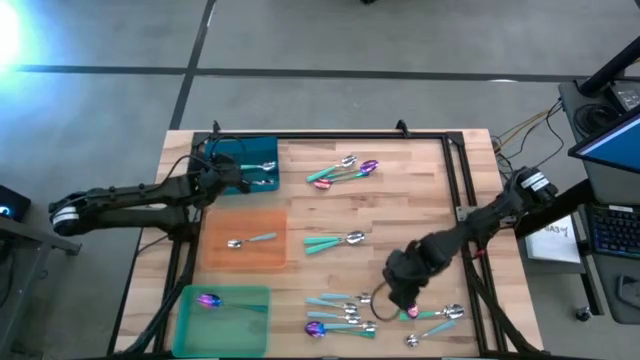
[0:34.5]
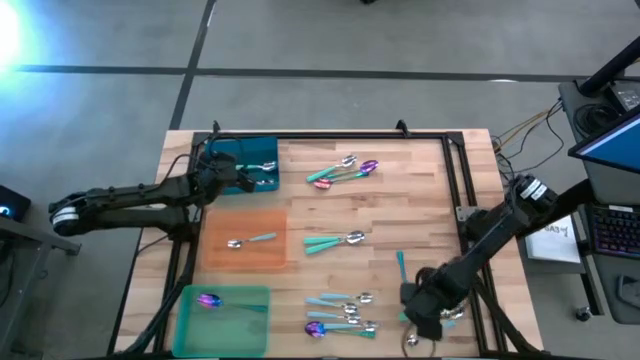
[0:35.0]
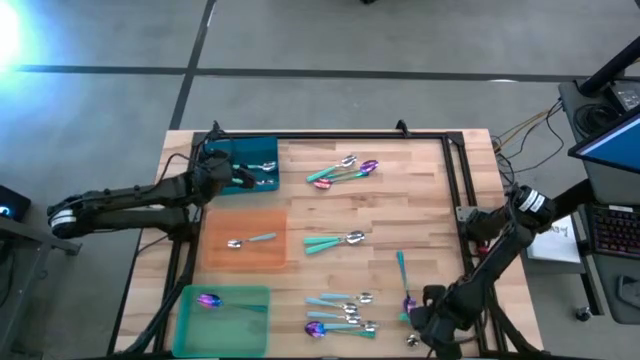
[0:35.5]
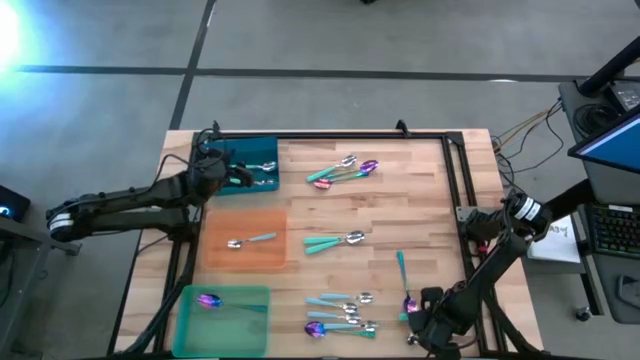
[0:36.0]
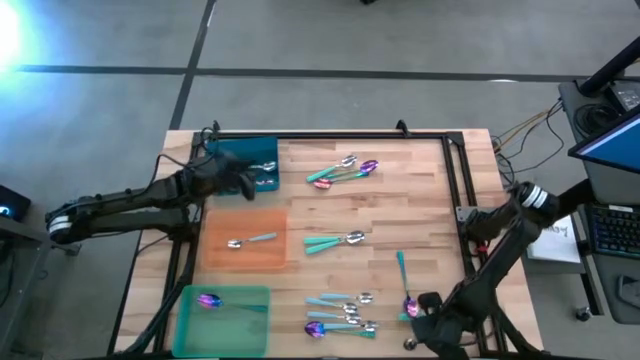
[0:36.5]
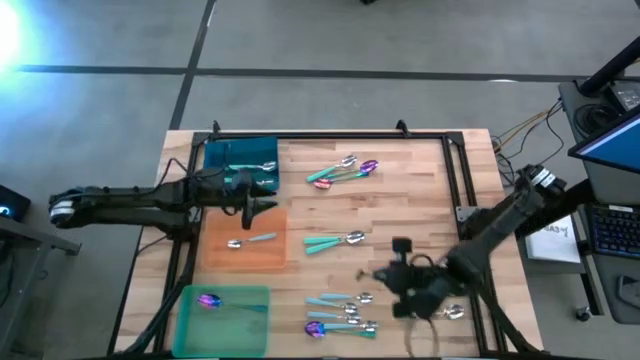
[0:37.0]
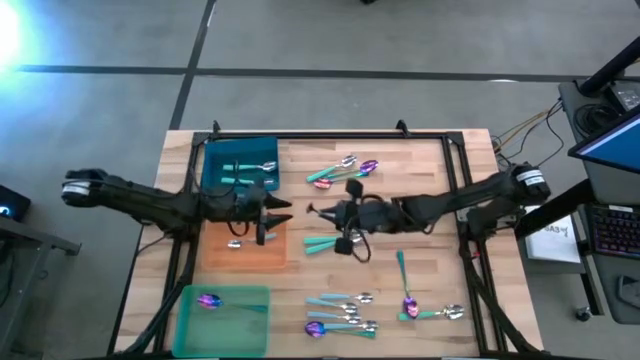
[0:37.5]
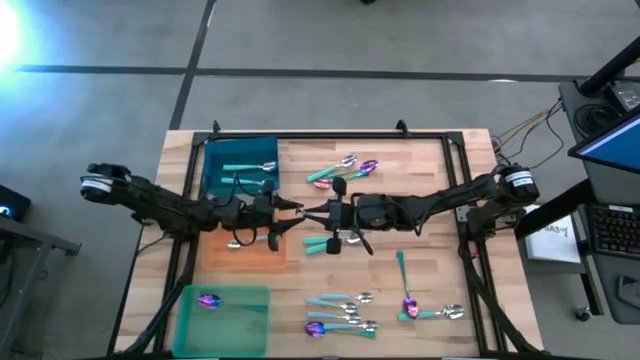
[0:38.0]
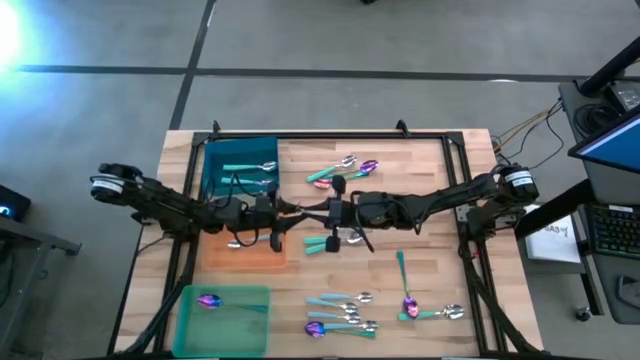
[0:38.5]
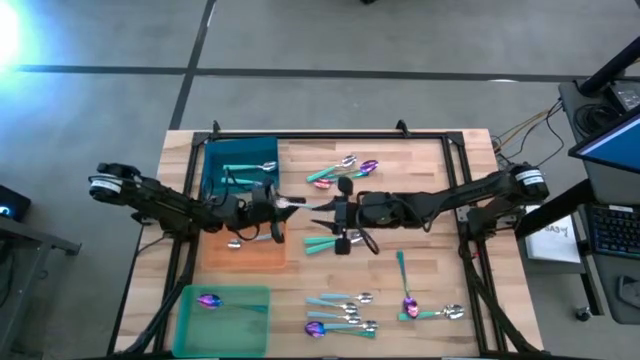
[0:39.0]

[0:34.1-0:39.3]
Task: Sort silverware by color (type)
Put the blue spoon into the orange bin

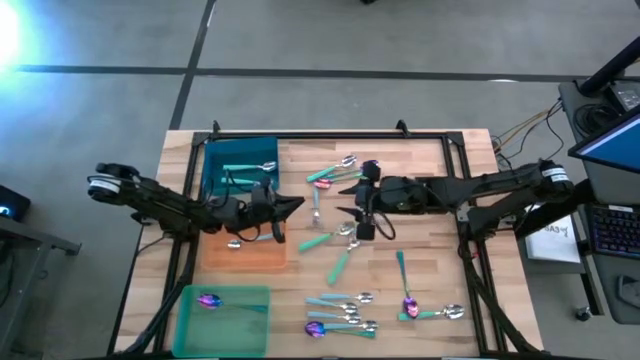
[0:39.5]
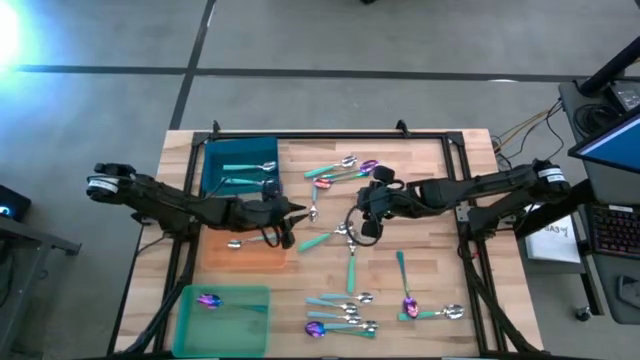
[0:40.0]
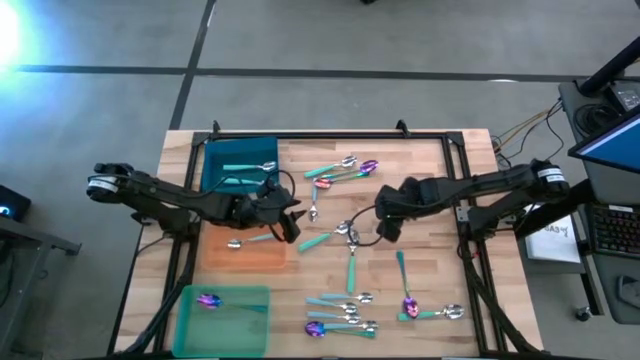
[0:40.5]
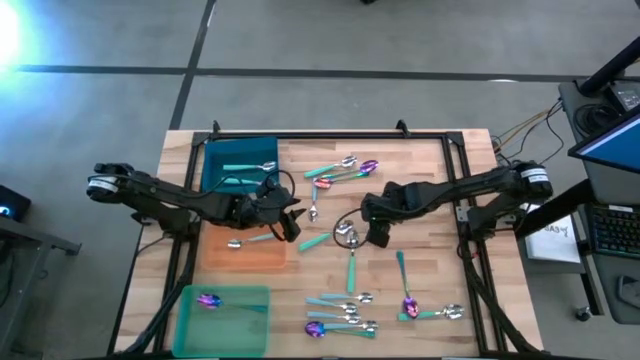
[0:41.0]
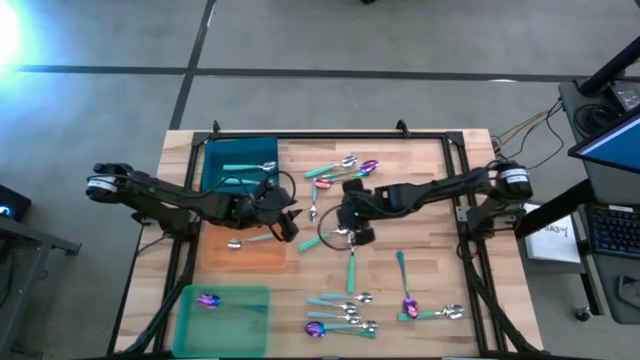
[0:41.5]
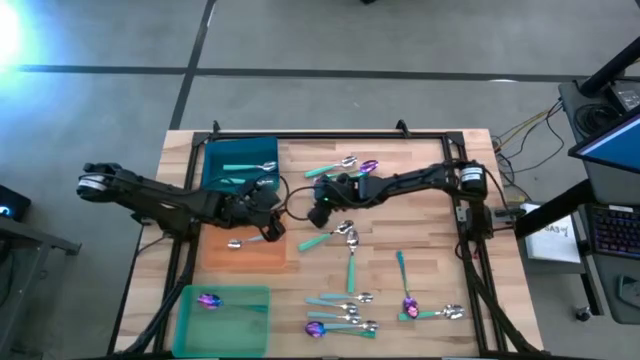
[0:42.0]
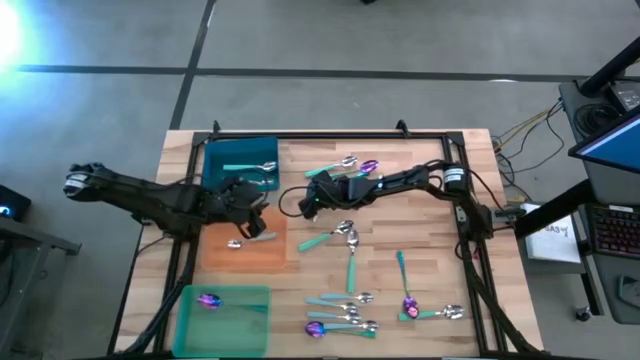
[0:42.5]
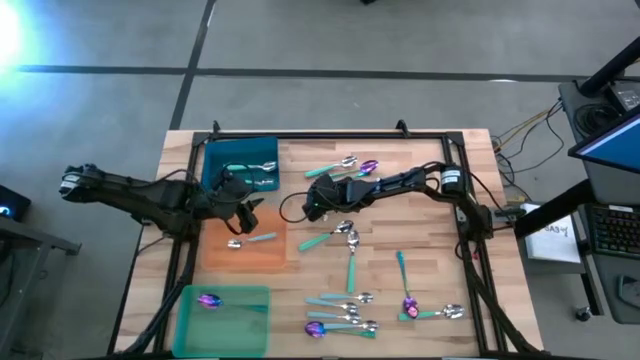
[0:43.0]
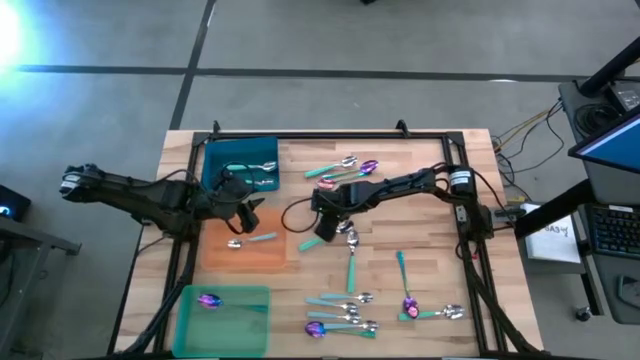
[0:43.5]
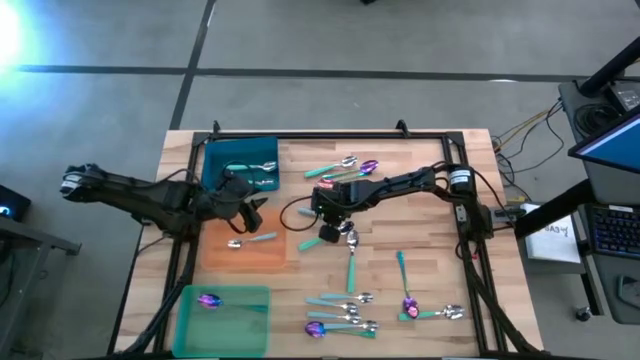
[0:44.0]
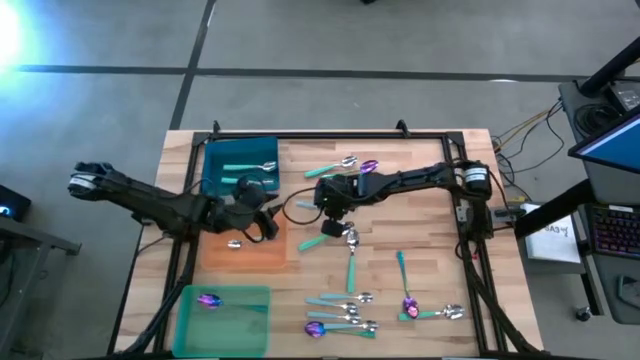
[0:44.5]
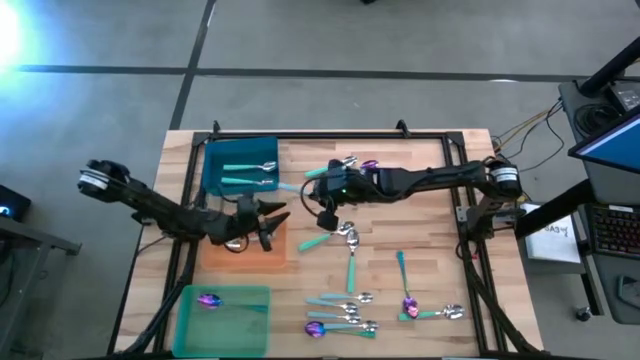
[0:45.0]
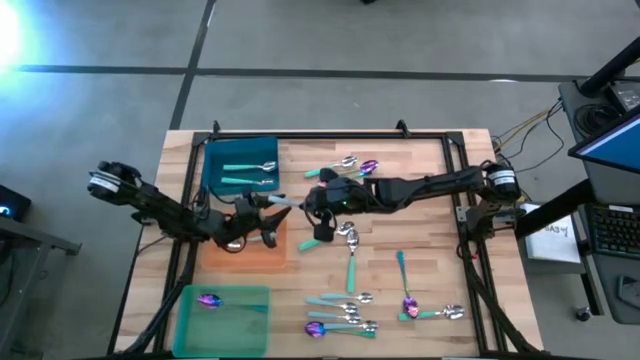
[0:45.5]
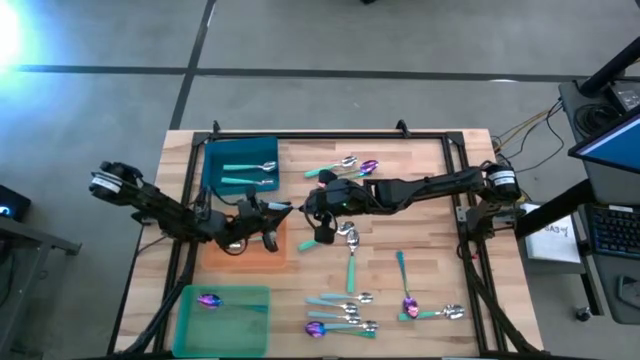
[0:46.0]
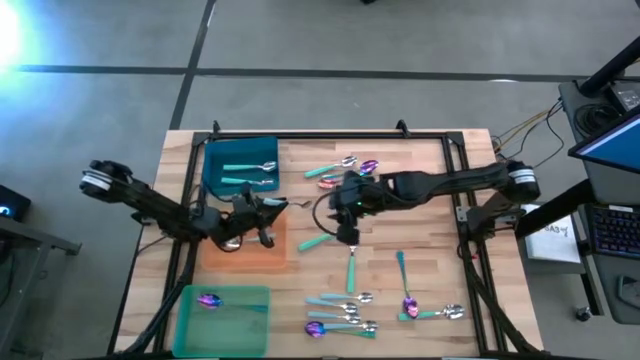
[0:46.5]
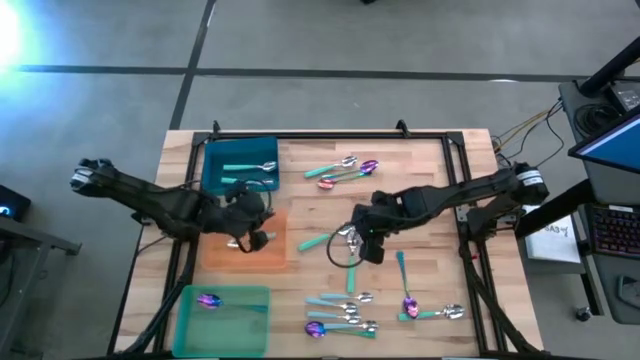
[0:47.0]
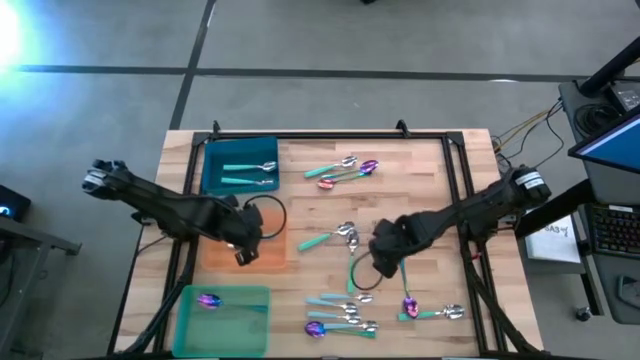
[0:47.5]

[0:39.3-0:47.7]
Put the blue spoon into the orange bin

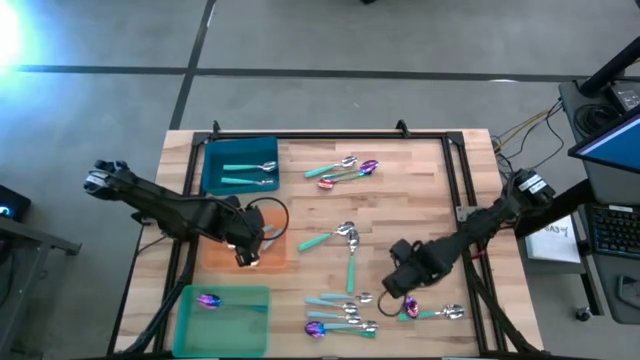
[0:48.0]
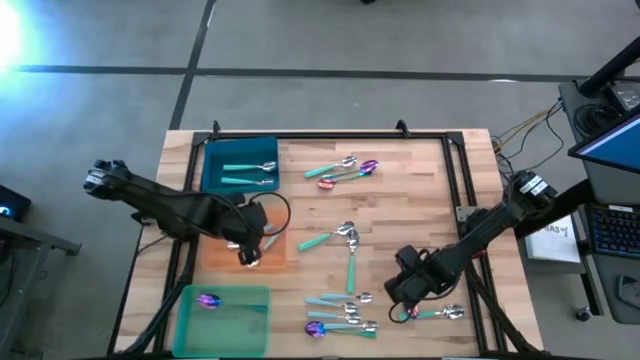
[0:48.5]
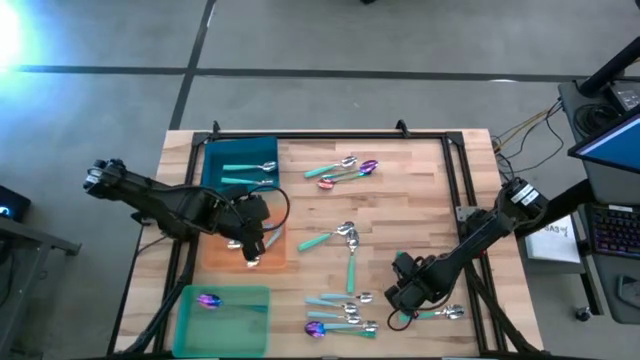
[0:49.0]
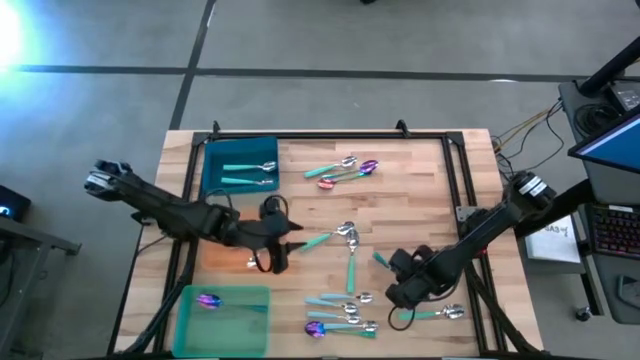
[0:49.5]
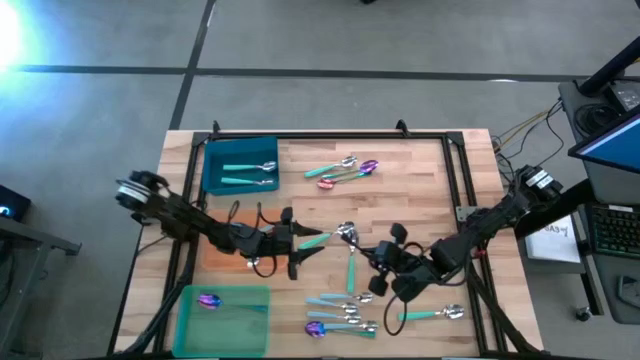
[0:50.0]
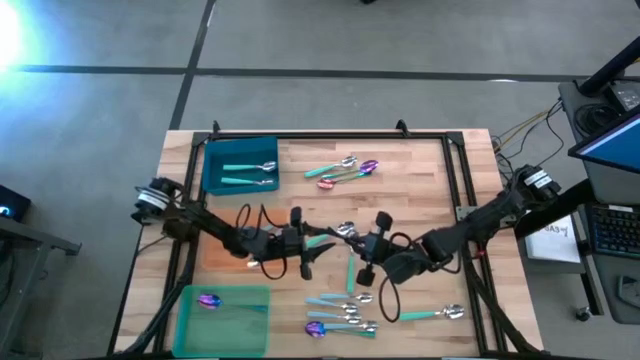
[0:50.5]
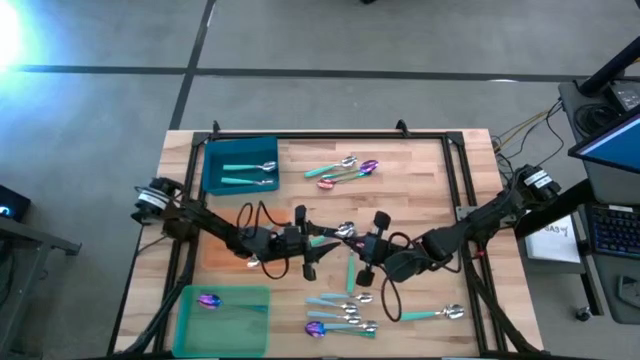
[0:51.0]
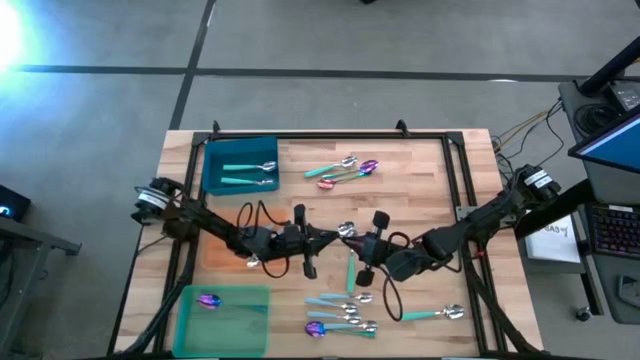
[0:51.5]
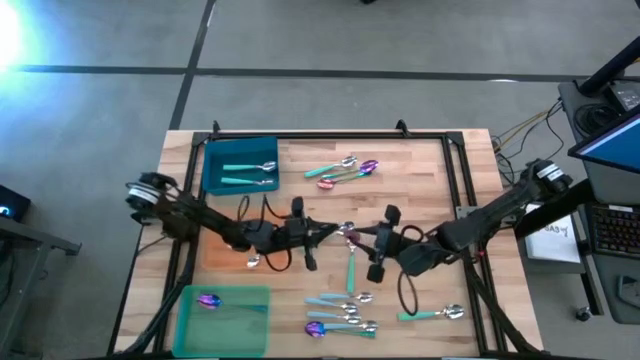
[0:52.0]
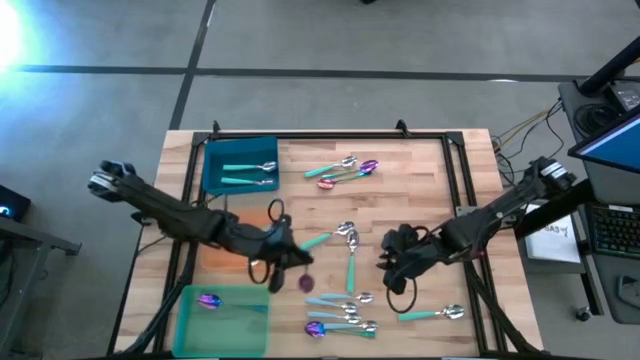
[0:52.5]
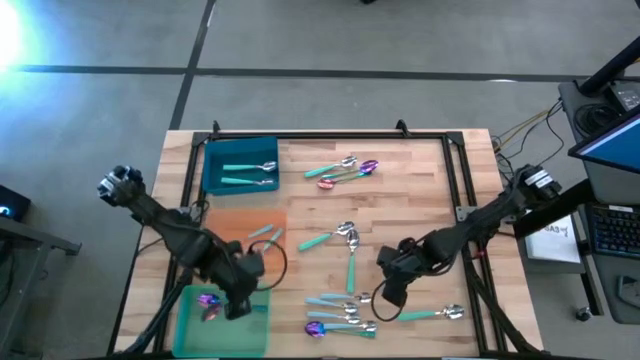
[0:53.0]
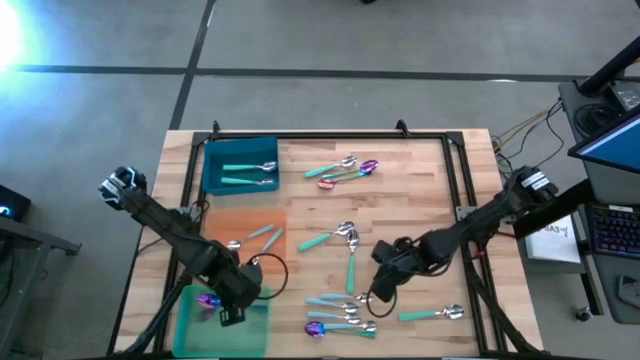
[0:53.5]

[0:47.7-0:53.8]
Put the violet spoon into the green bin

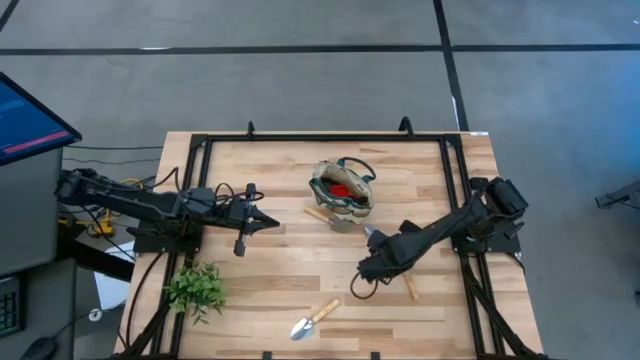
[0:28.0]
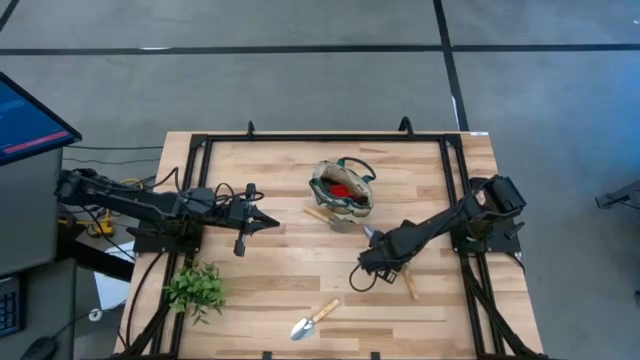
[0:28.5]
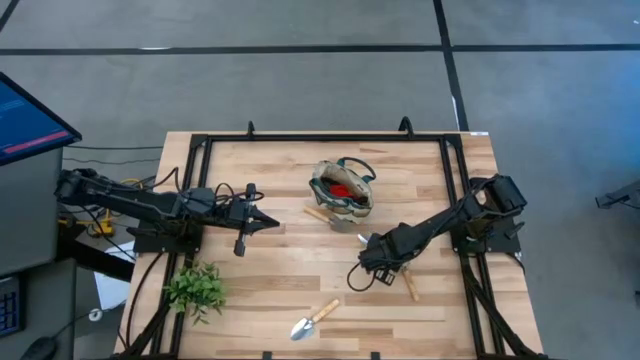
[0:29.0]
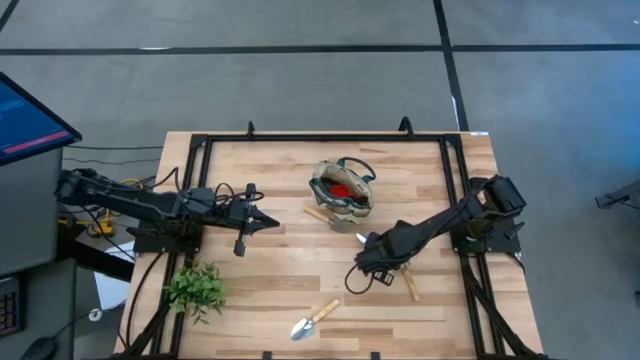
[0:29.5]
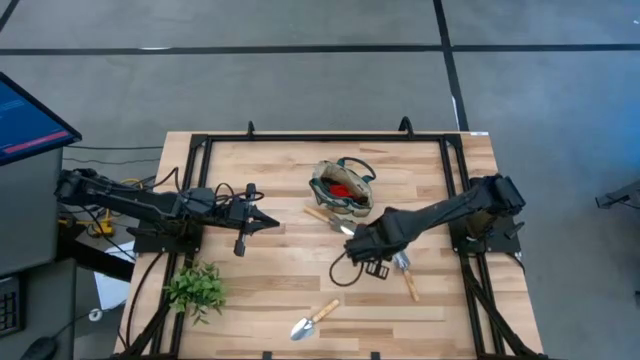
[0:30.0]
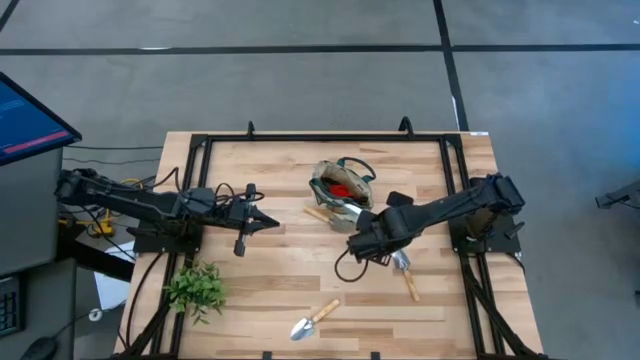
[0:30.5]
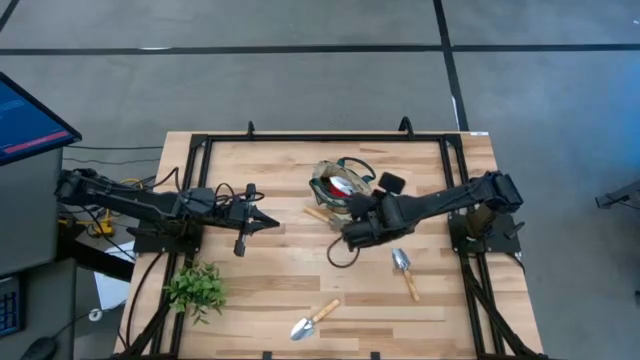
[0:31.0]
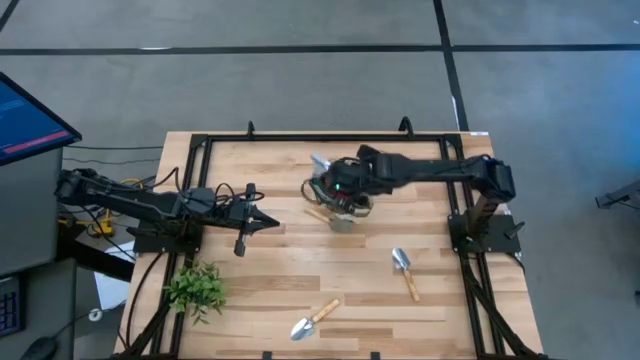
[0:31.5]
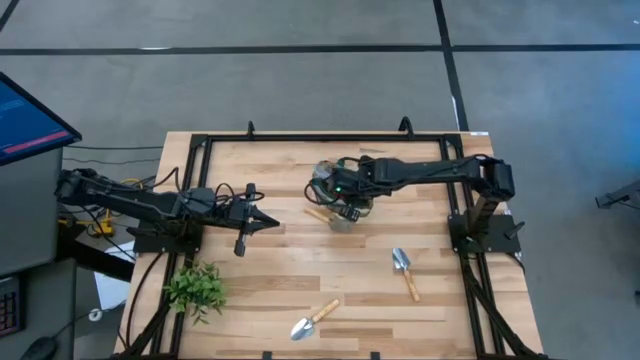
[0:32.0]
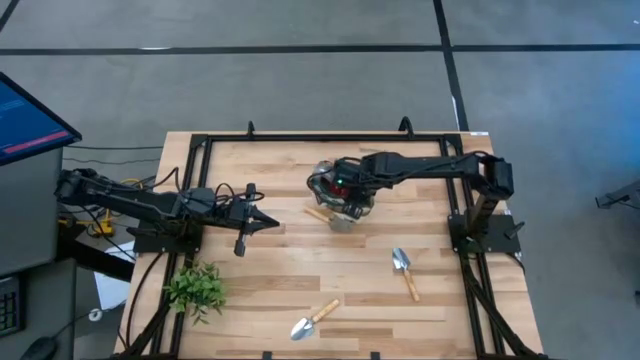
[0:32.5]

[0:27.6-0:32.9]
Task: Pick & Place Garden tools in Gardening bag
Put the brown trowel into the gardening bag
